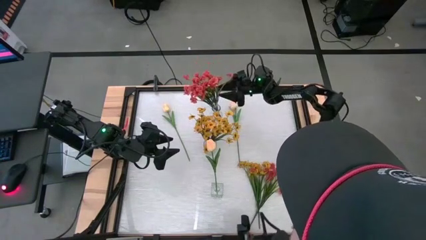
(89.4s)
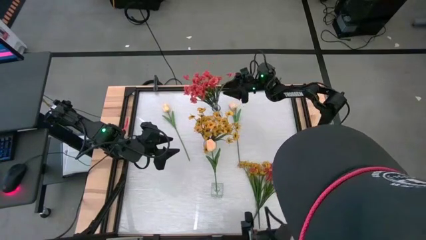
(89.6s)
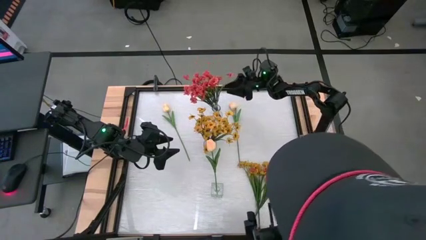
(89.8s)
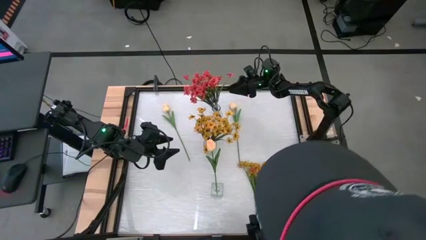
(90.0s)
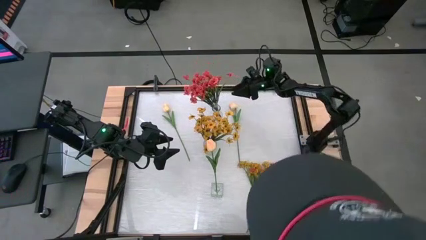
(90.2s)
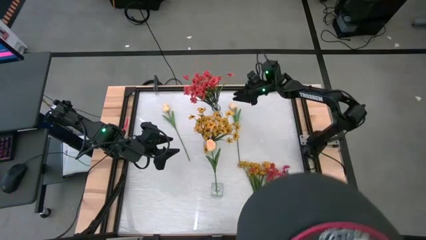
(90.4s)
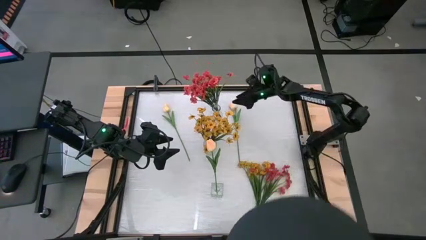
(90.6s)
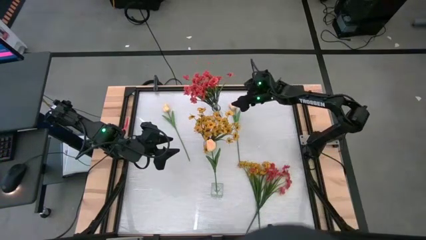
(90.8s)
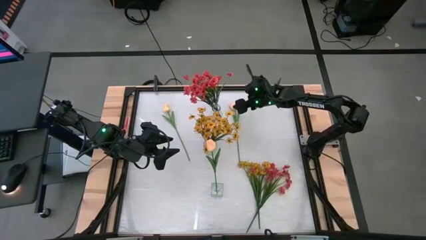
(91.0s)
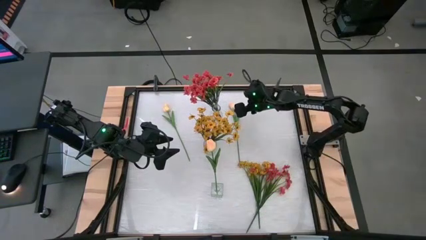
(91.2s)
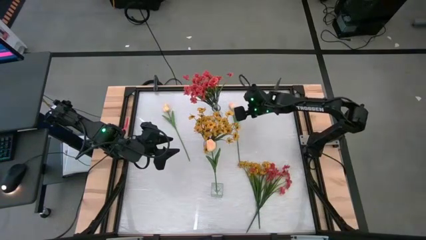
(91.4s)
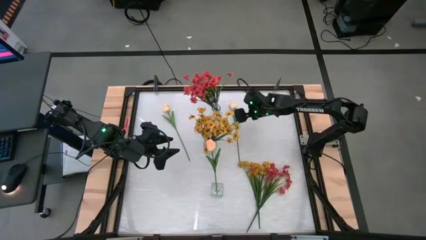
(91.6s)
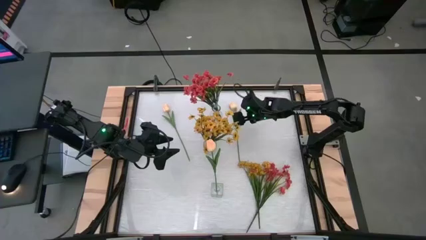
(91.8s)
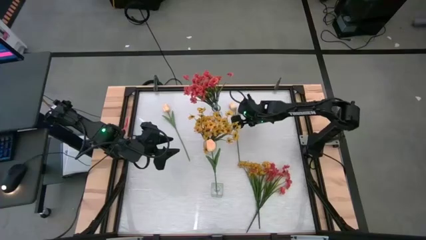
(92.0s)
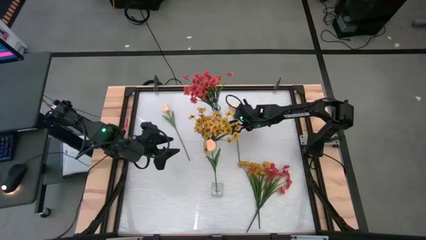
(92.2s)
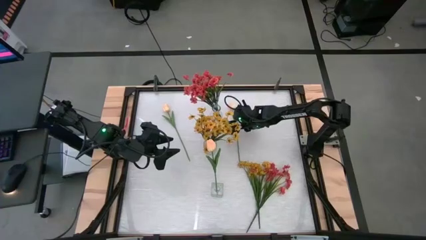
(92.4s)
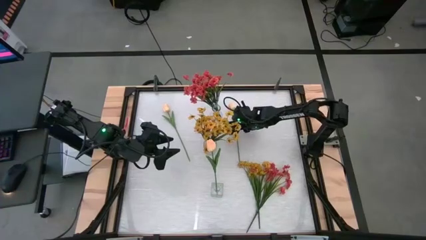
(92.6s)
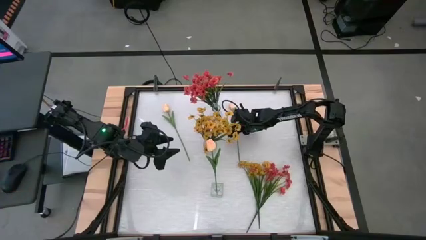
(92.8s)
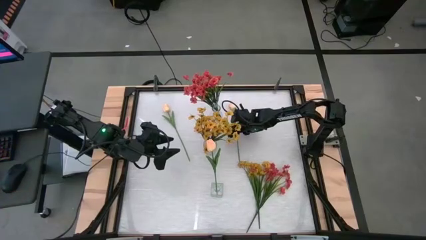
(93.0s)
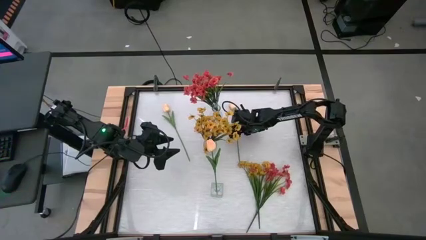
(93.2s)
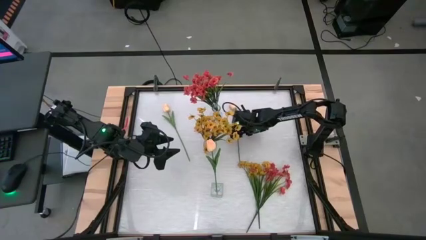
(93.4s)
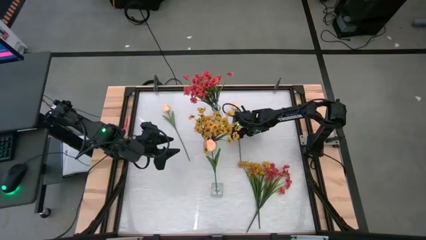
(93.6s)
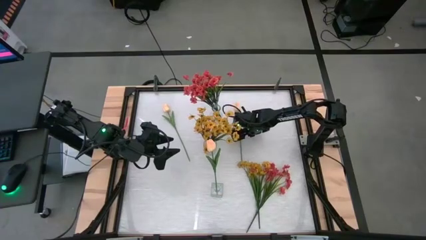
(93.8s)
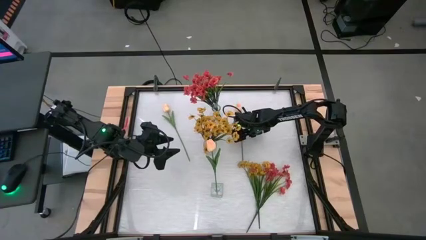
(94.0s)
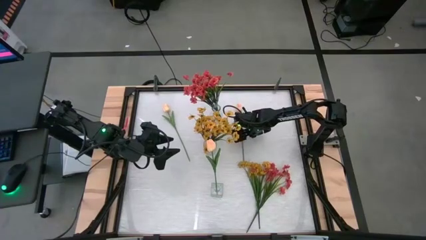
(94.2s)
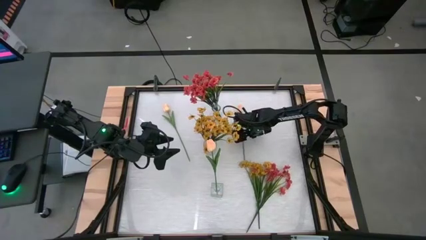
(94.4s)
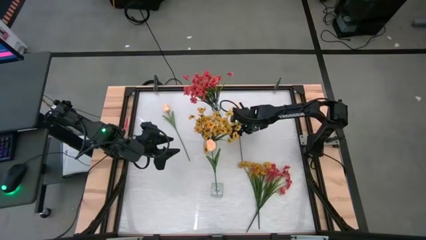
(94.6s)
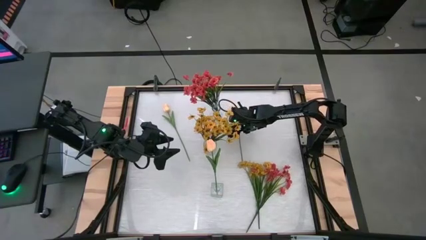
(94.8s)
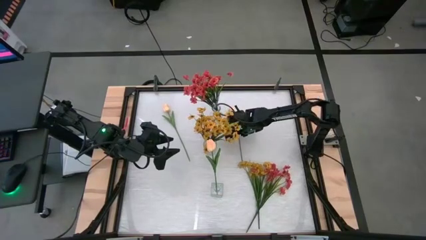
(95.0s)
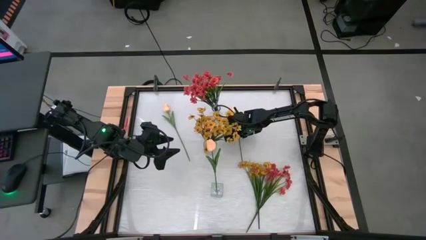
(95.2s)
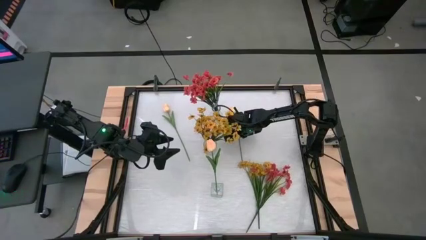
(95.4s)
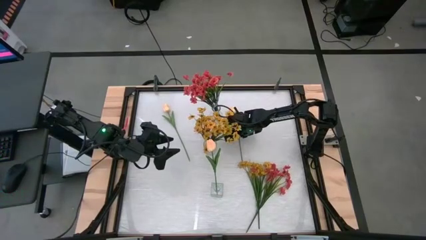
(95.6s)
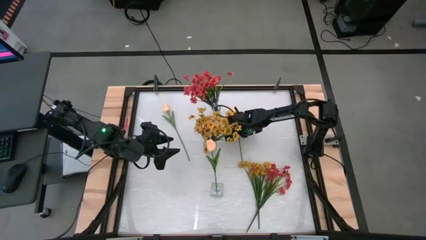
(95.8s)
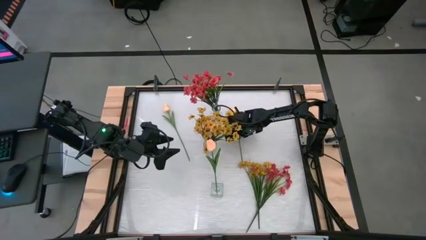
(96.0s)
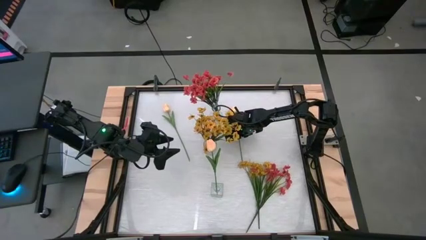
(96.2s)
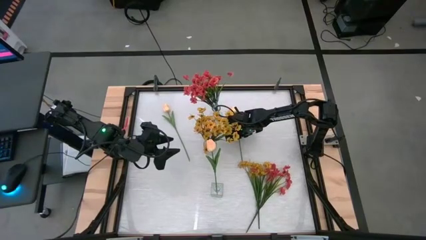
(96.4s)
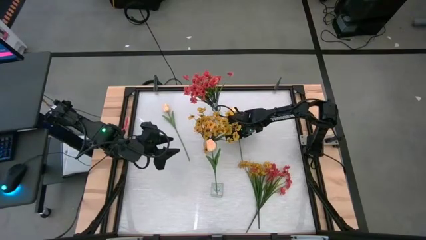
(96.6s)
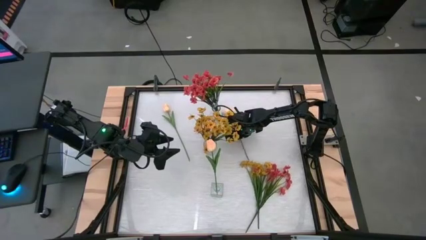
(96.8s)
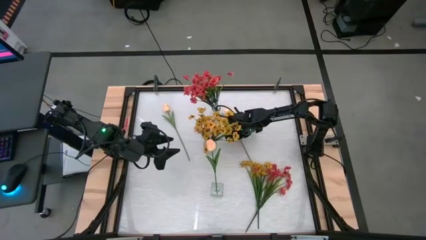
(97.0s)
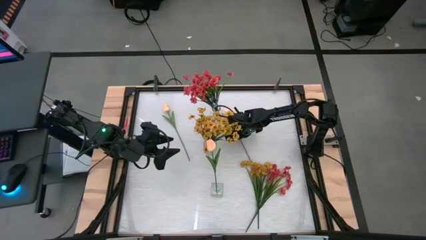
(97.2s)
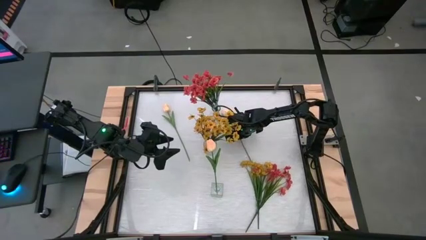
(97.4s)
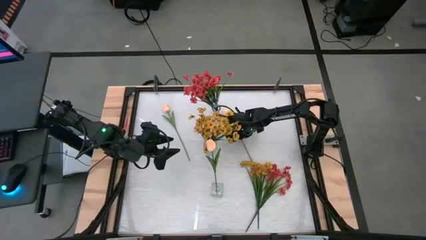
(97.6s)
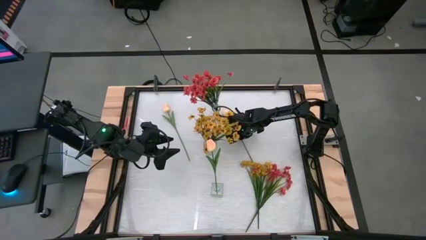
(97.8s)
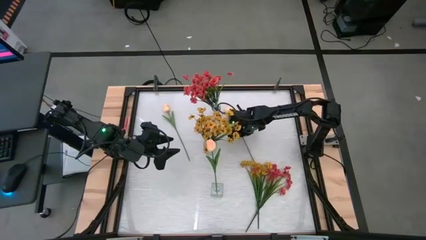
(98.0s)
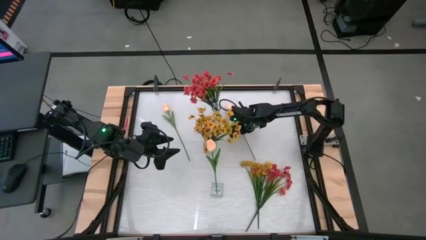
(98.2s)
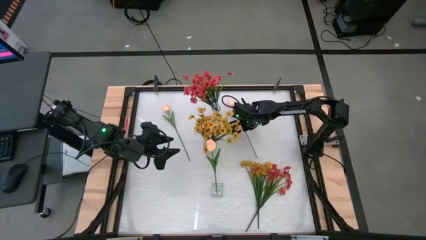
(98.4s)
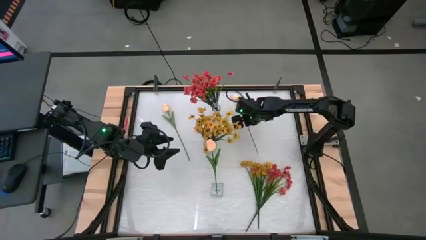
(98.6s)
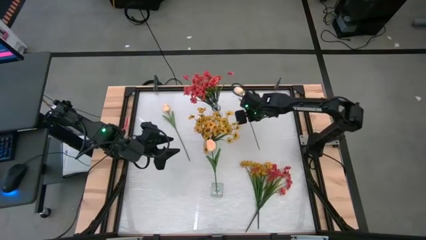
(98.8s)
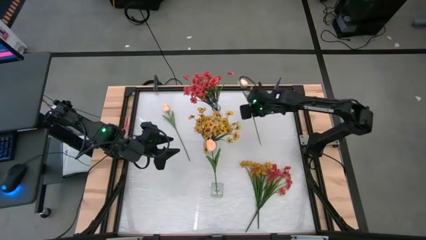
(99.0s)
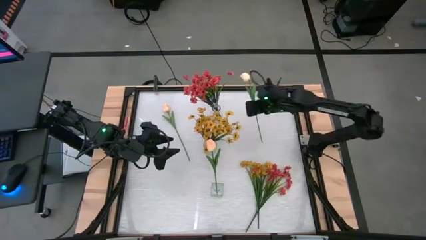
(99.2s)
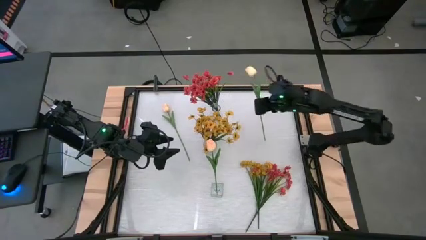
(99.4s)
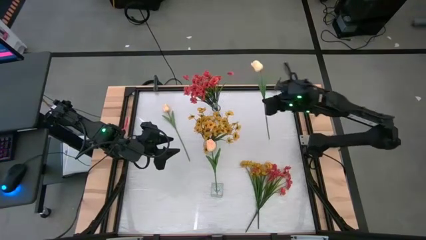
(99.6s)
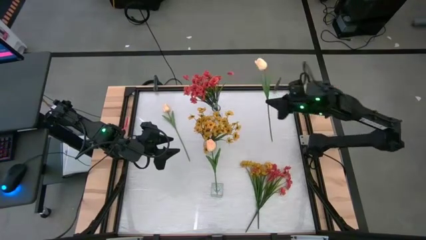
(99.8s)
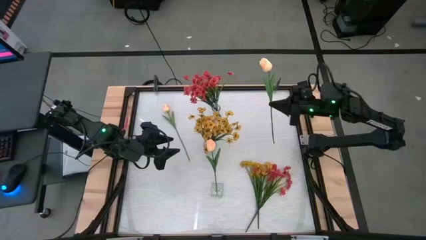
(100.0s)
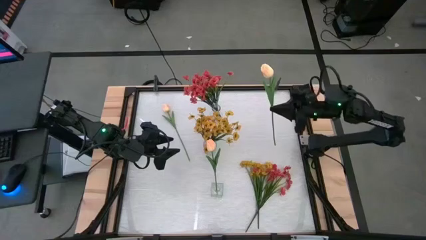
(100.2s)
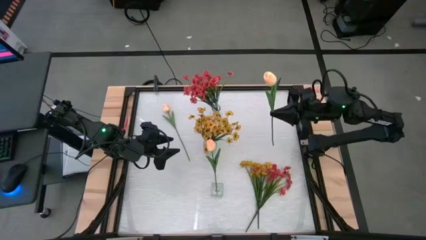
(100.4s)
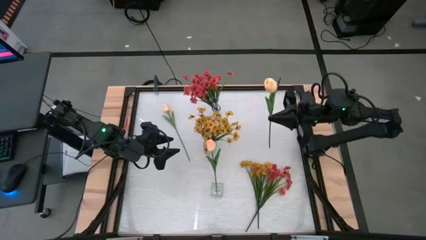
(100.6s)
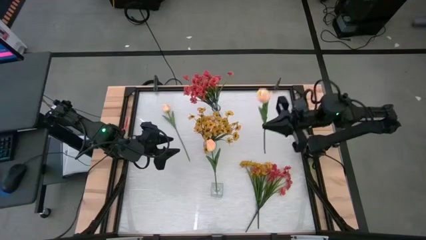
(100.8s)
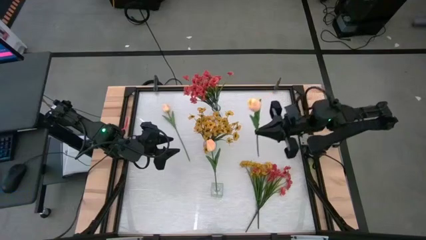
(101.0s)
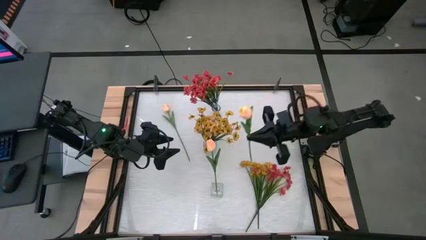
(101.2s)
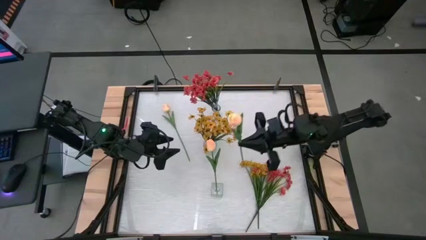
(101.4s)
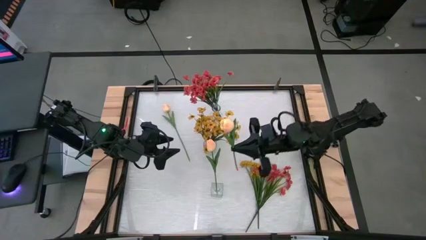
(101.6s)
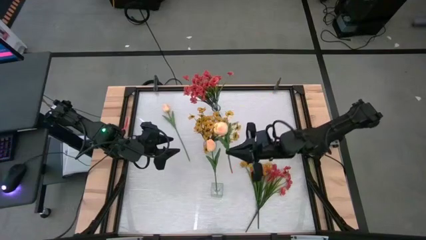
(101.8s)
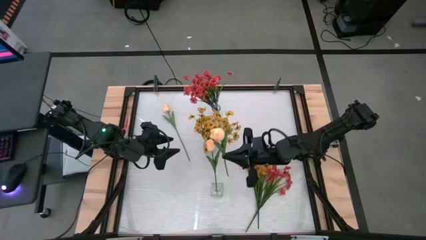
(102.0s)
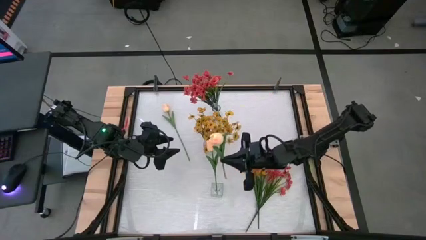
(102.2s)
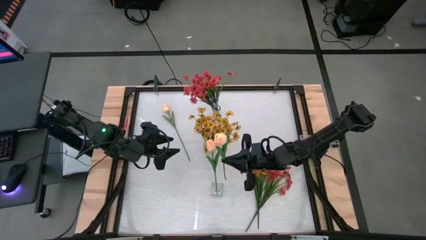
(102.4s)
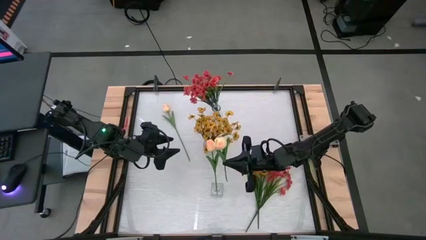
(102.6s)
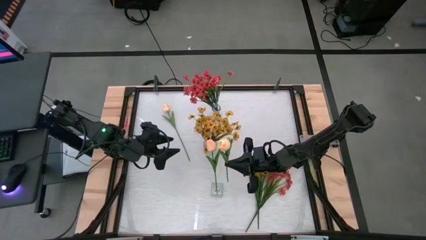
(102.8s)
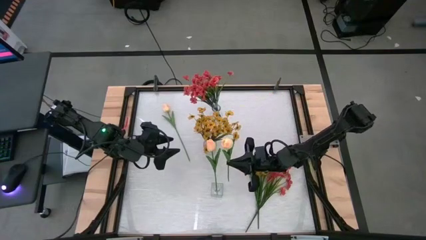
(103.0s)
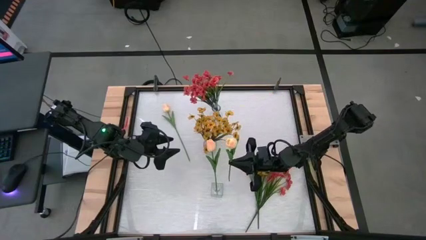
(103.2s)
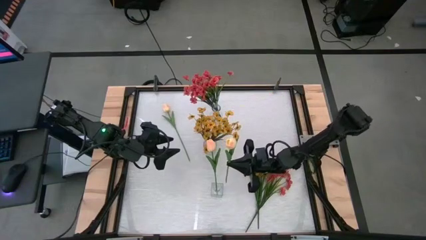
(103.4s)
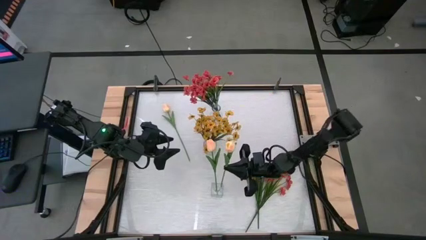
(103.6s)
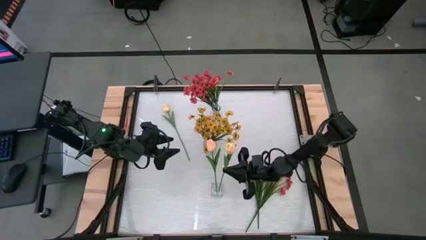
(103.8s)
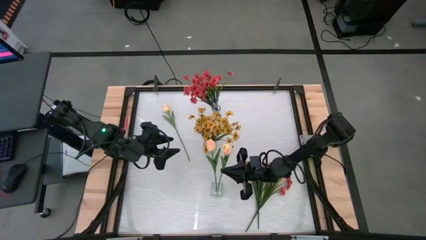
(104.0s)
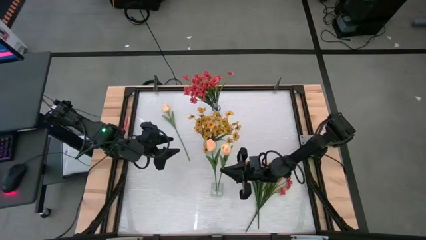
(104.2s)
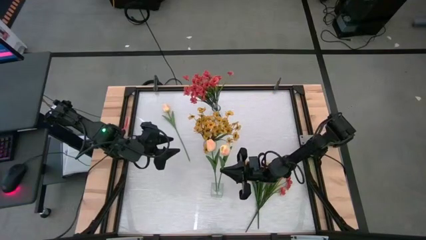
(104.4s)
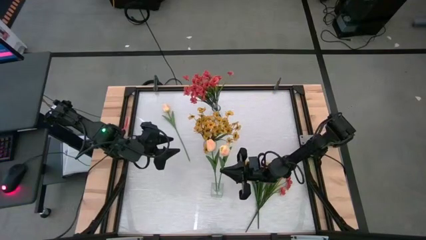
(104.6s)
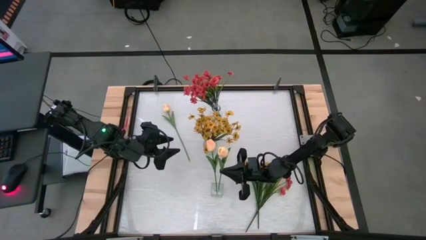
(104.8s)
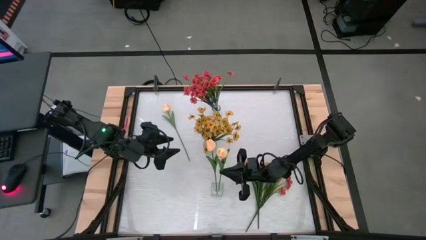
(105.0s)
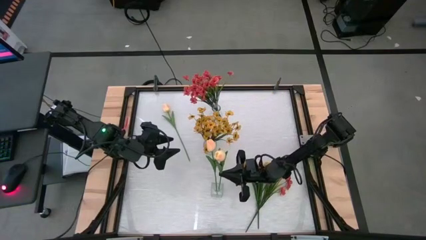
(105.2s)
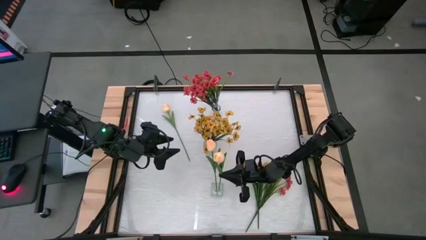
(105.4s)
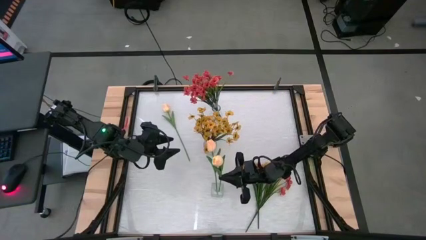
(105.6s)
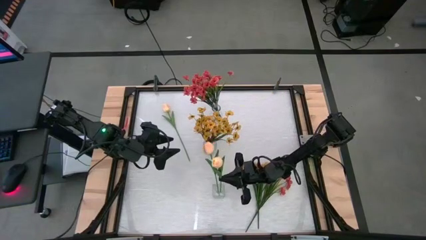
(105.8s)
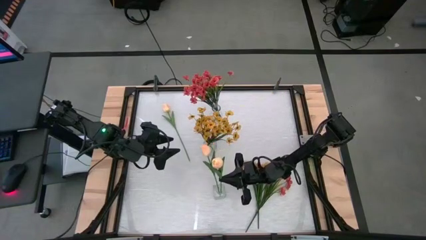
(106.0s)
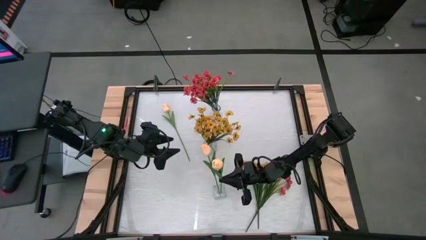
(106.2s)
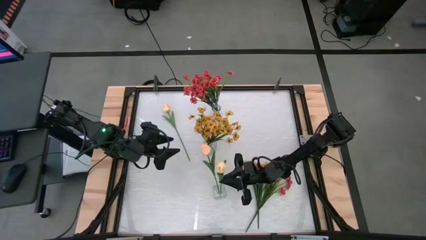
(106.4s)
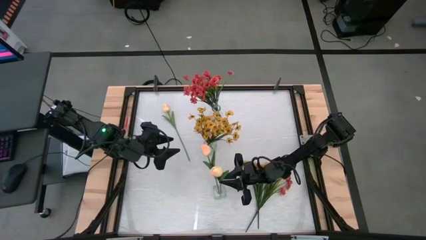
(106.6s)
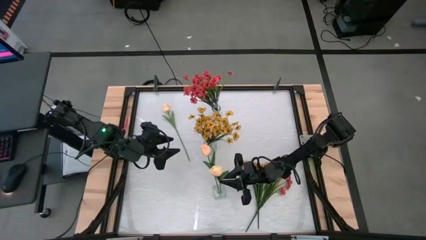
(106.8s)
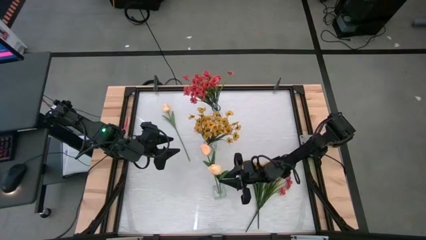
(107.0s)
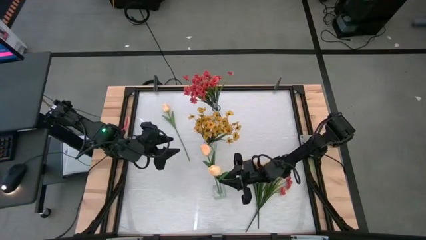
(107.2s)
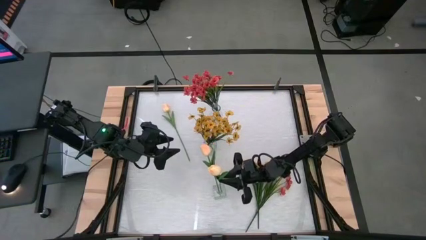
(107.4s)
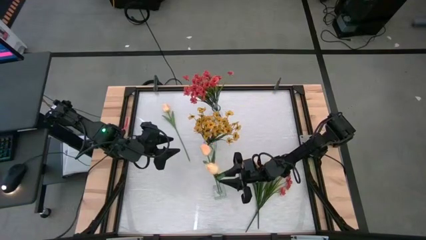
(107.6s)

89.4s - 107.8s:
Task: Sort flowers into vase by color
Put the right orange flower into the bottom transparent vase
